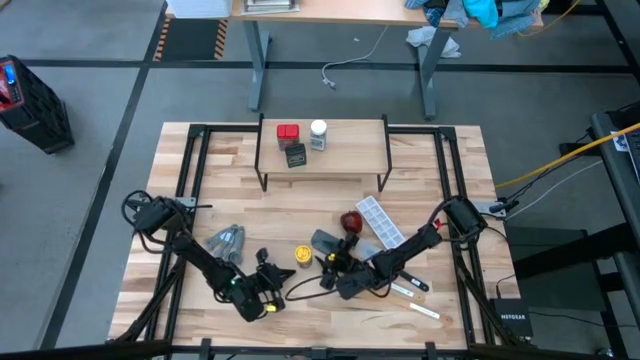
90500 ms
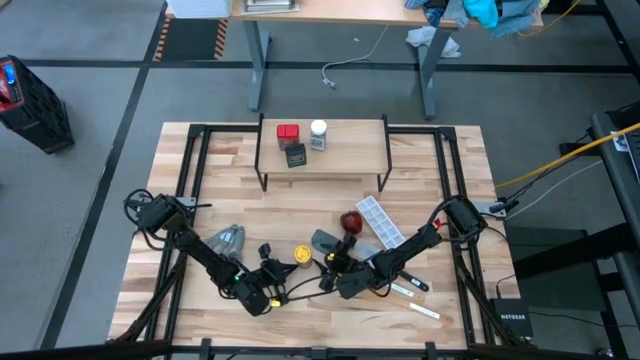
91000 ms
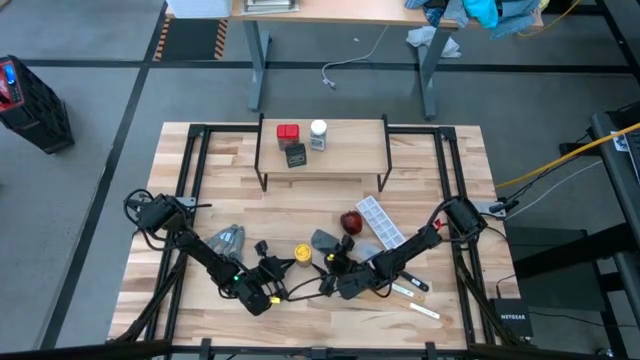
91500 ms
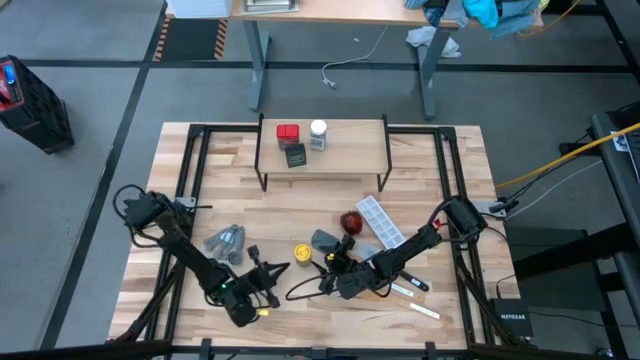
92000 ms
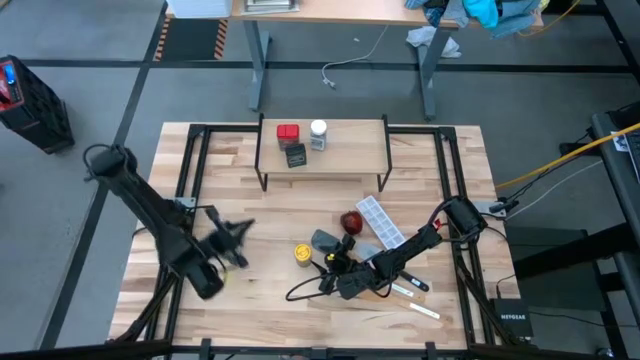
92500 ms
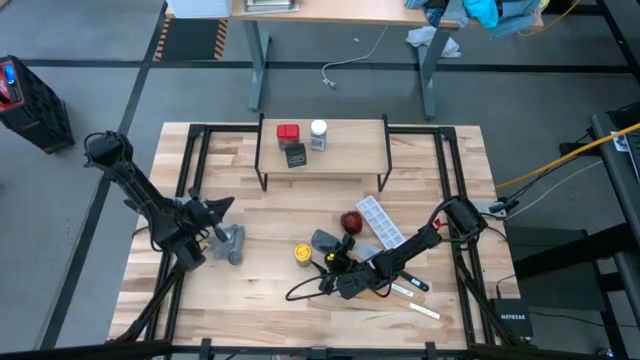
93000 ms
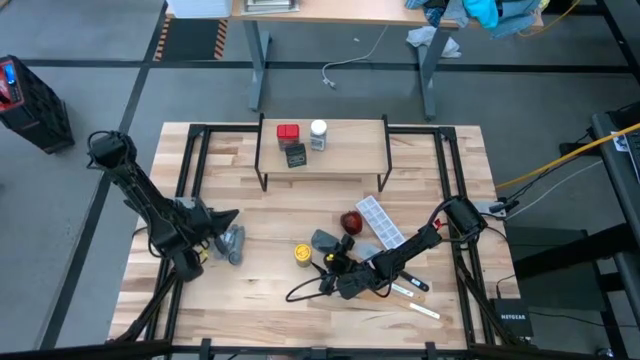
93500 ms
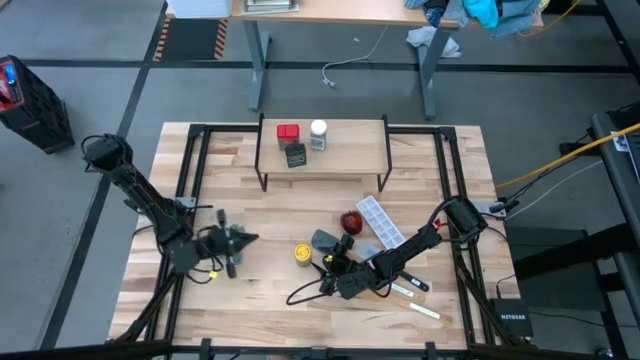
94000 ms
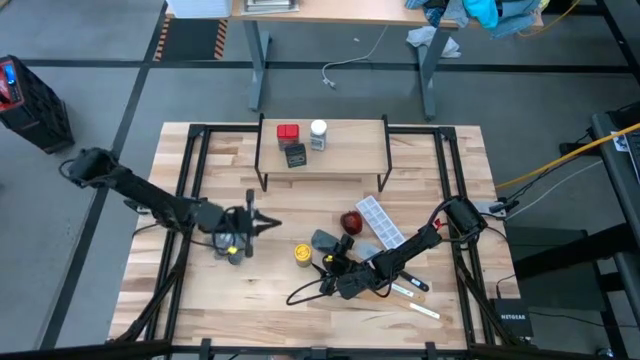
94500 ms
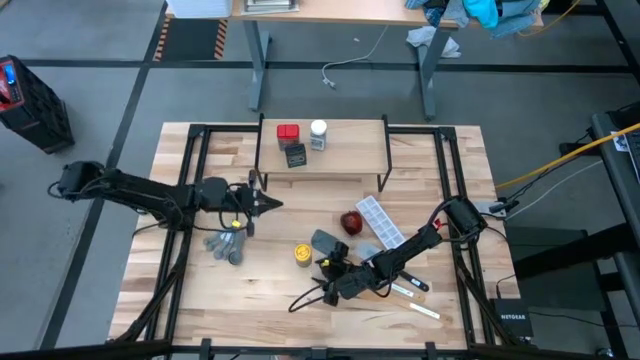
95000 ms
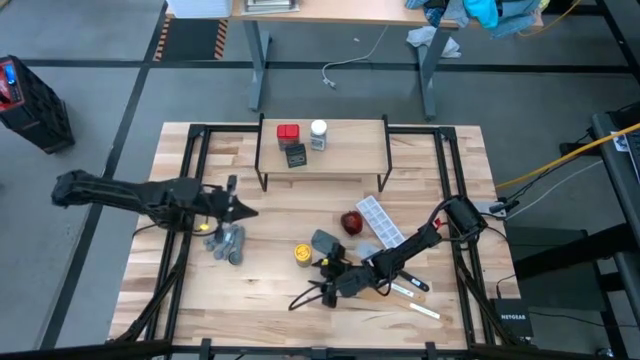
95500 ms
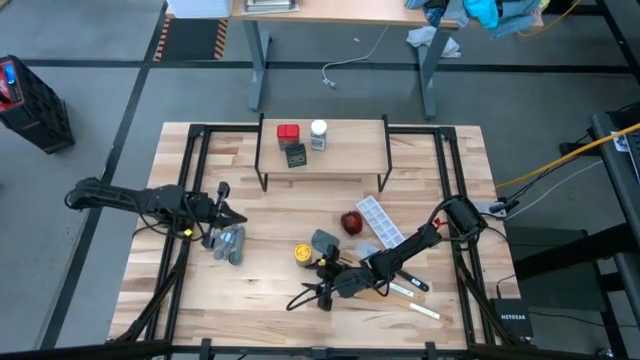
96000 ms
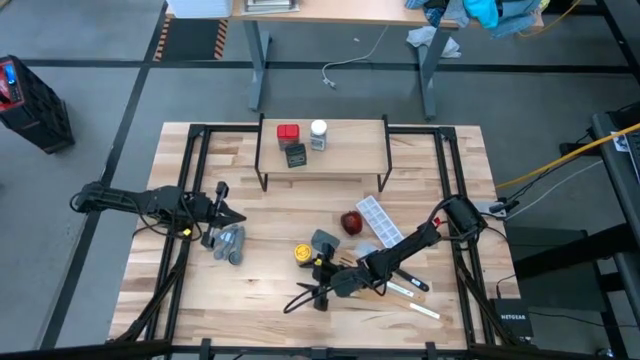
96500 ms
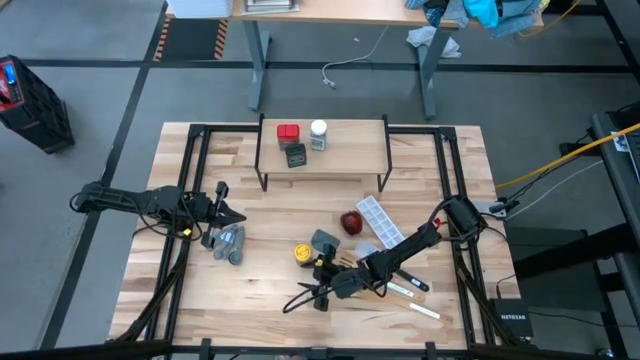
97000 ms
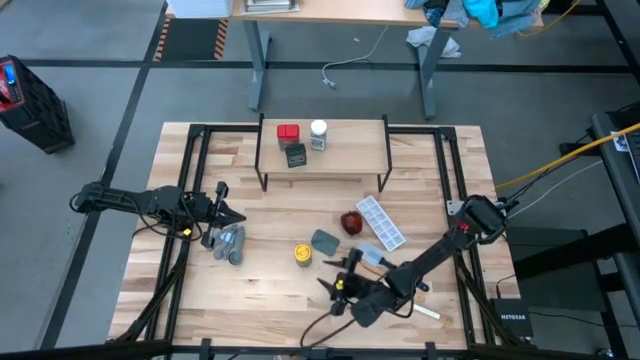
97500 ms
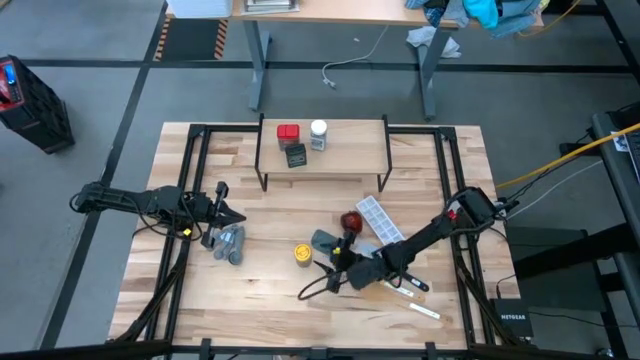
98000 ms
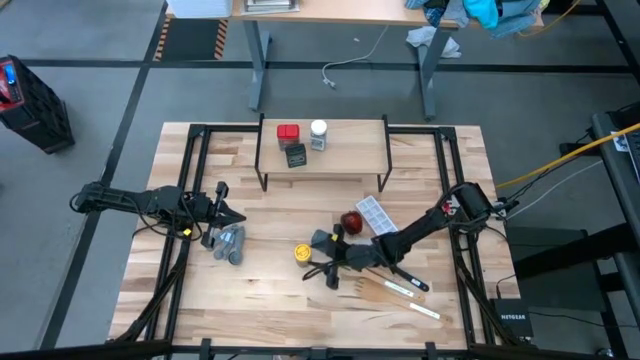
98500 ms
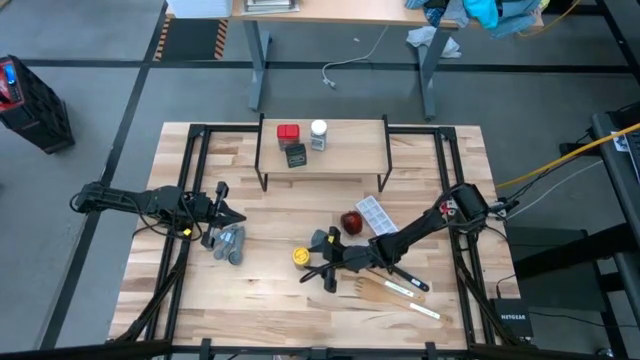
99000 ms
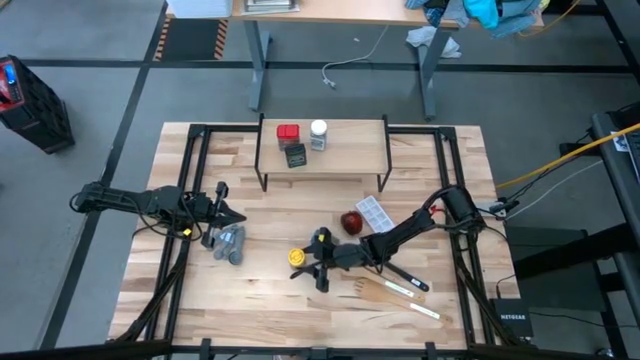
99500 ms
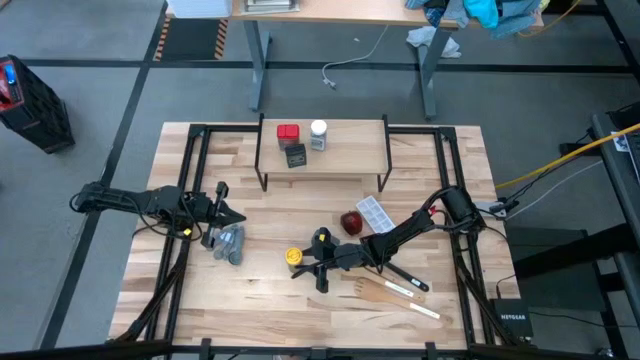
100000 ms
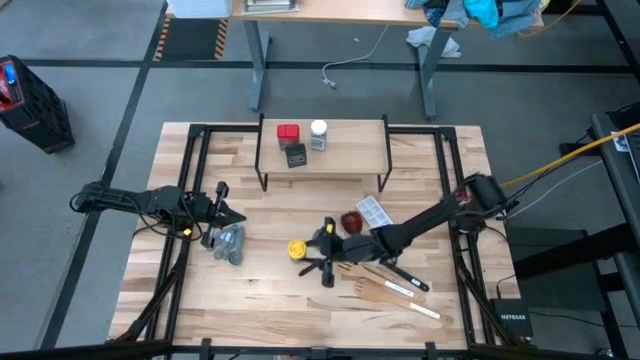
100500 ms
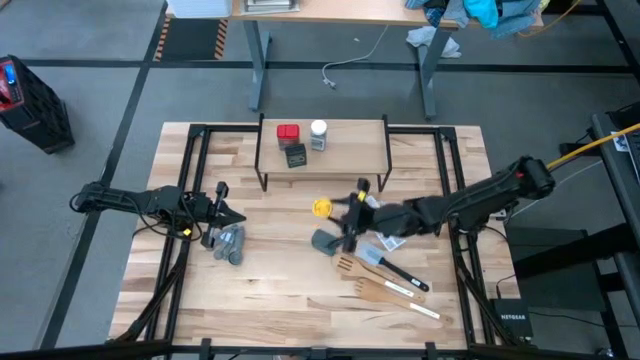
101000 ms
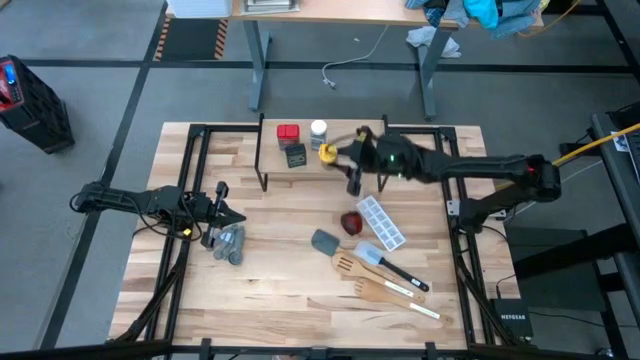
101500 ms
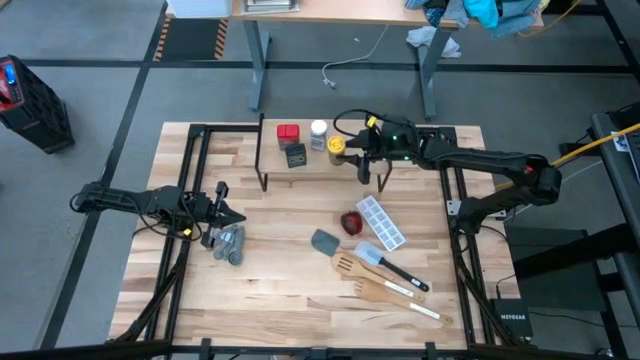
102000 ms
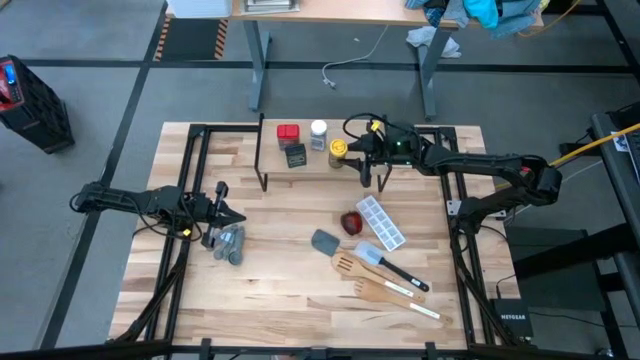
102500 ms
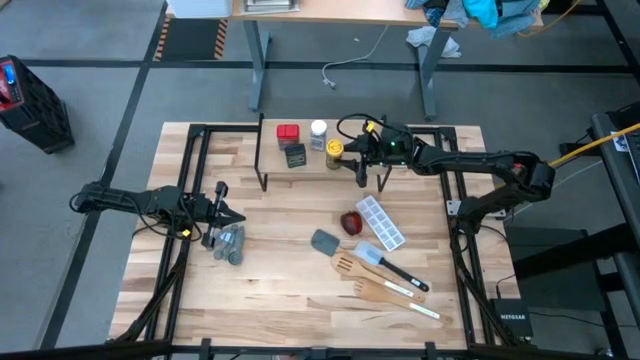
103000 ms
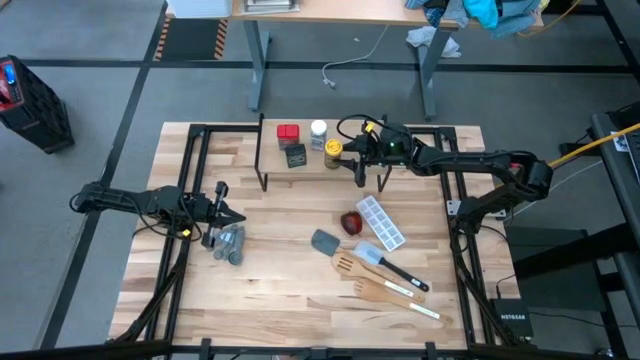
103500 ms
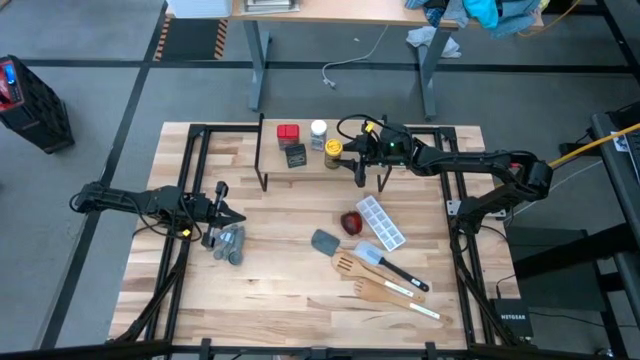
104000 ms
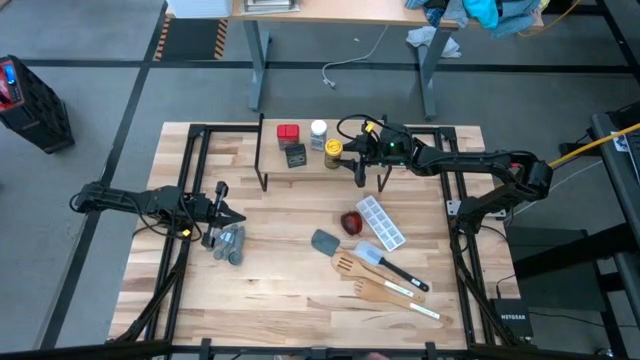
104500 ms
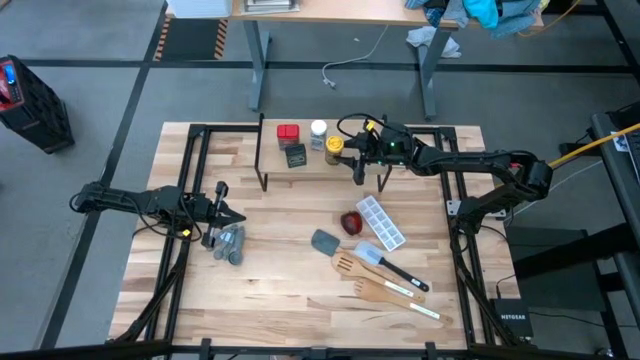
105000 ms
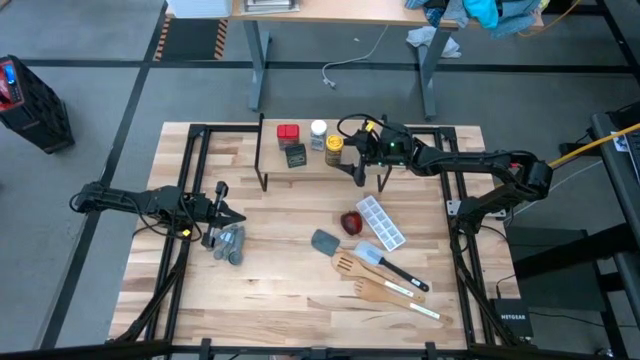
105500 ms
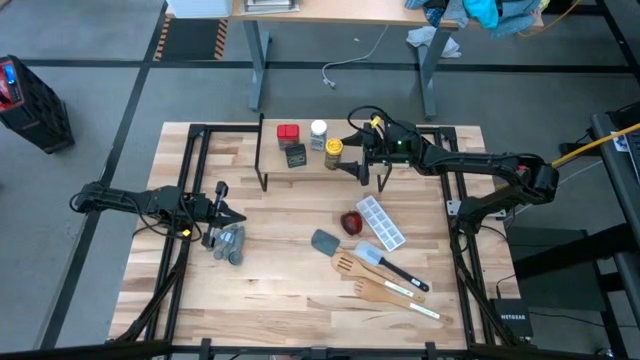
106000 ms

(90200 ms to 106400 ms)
Task: Shelf spices
Put the yellow seasoning bottle on the shelf

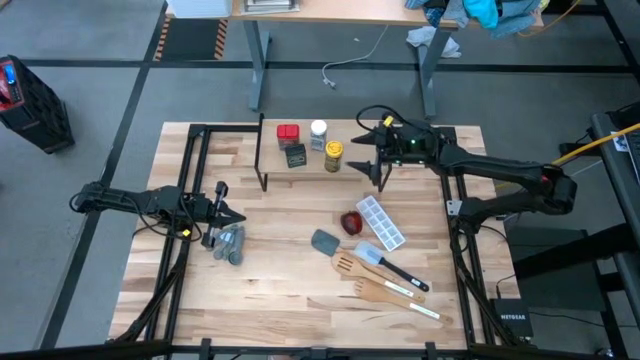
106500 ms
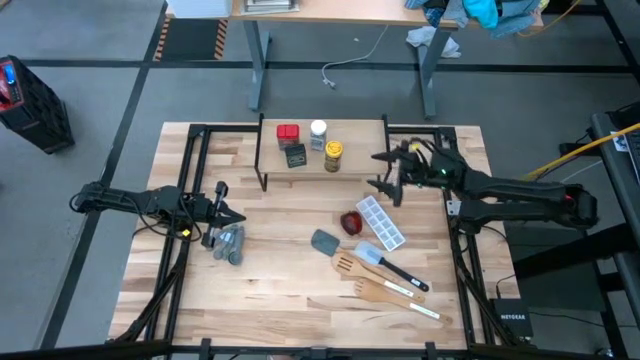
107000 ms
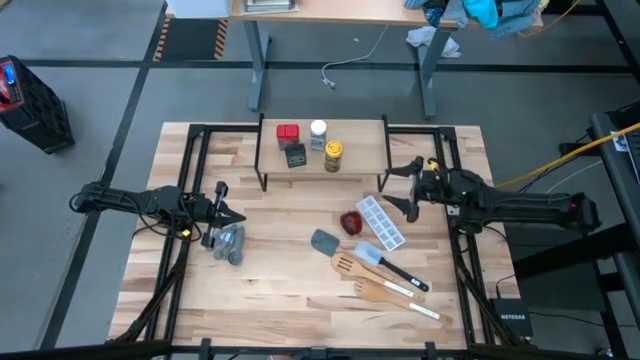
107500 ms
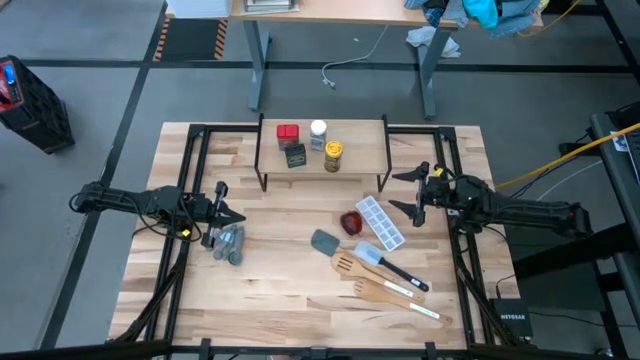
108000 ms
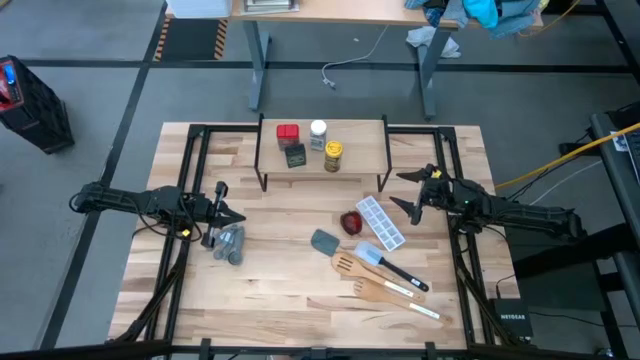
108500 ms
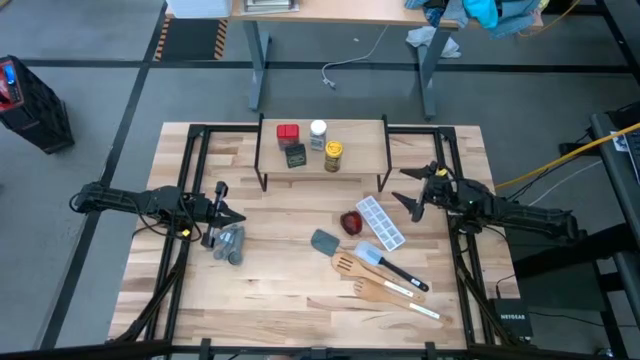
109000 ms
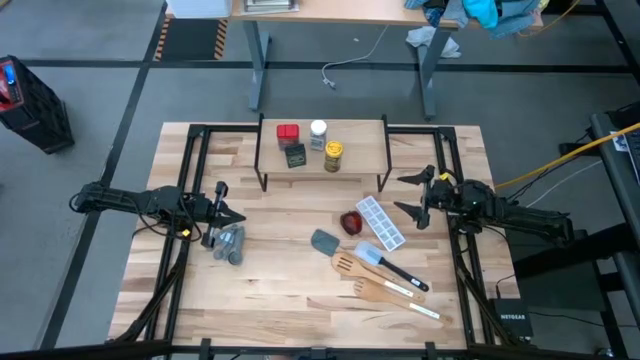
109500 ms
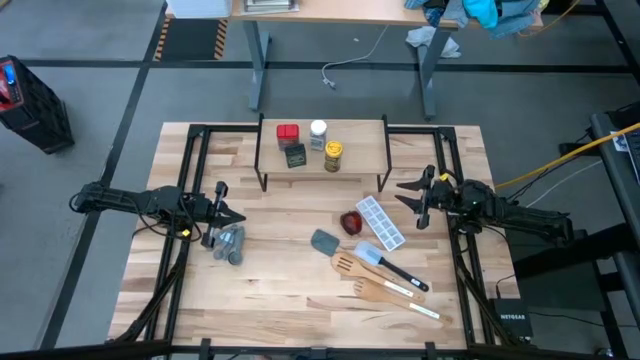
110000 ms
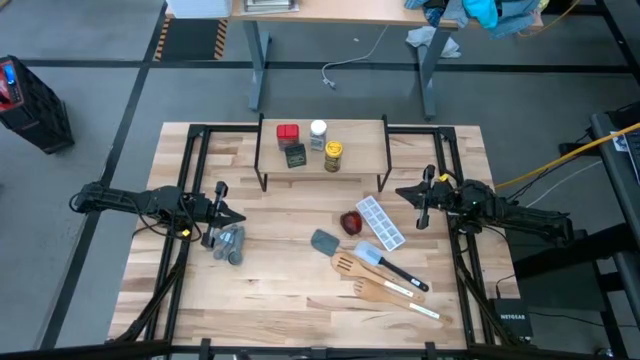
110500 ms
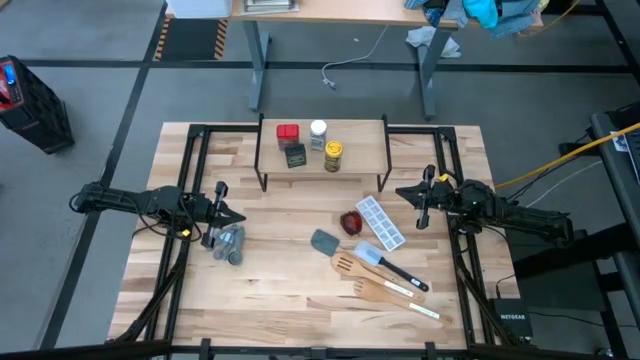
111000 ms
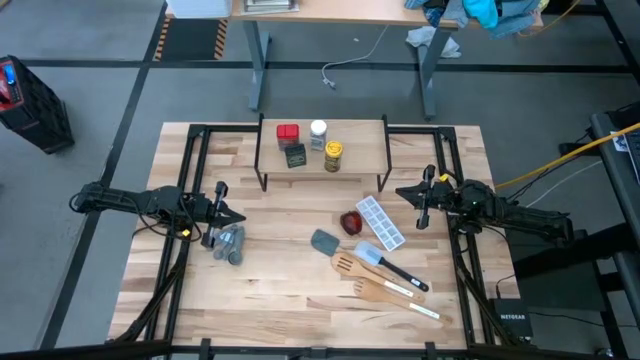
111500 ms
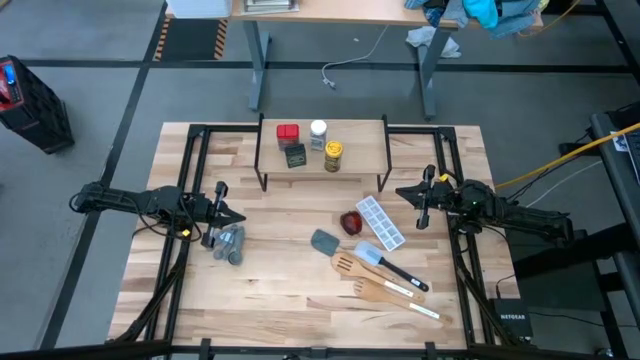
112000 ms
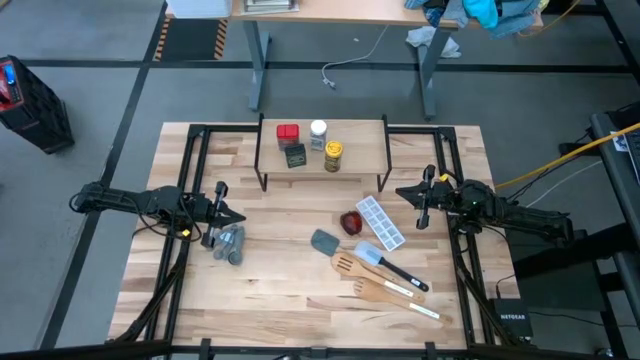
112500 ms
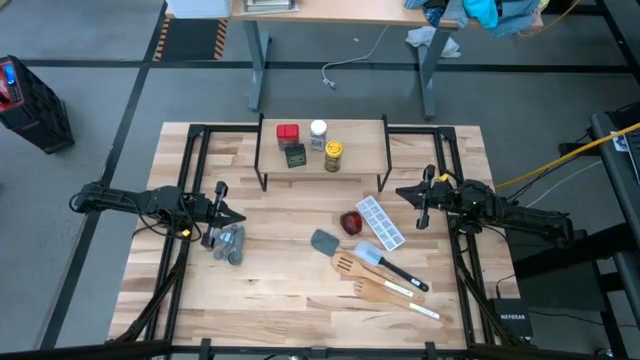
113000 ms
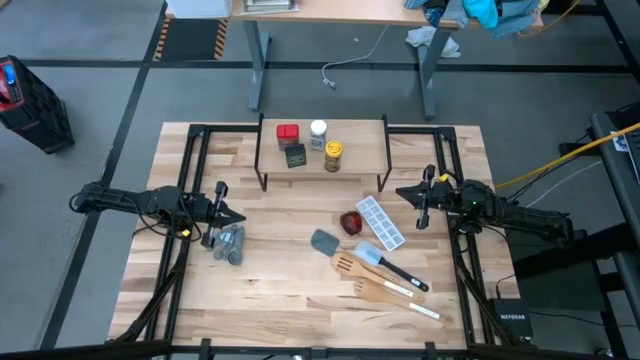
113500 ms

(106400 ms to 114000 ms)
Return to Home Position
